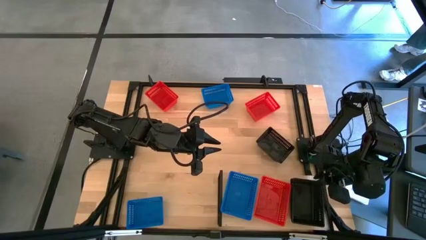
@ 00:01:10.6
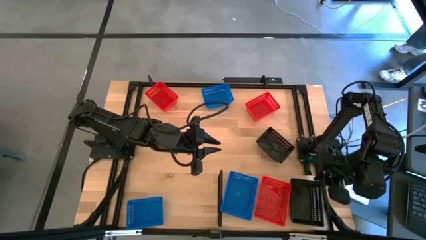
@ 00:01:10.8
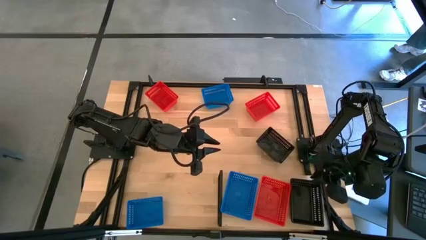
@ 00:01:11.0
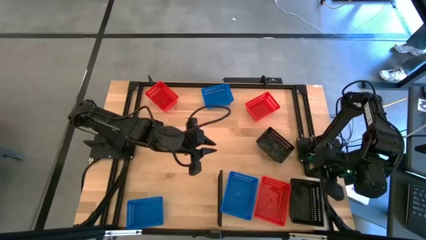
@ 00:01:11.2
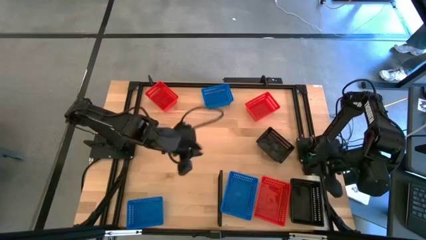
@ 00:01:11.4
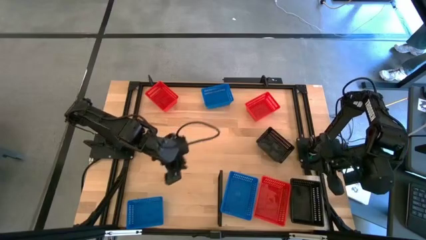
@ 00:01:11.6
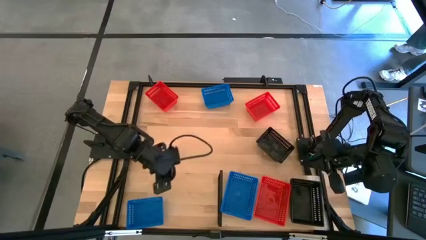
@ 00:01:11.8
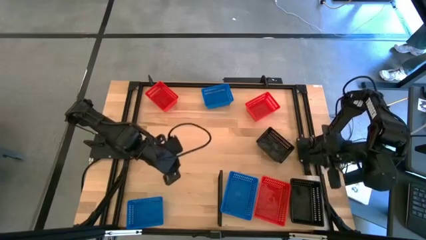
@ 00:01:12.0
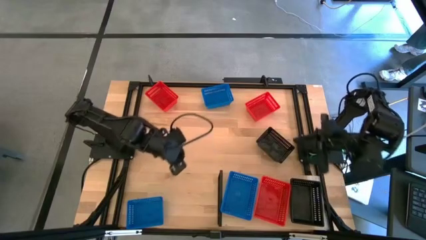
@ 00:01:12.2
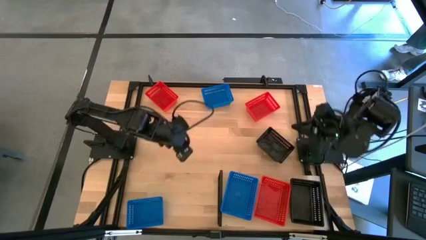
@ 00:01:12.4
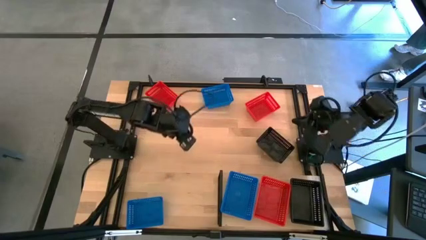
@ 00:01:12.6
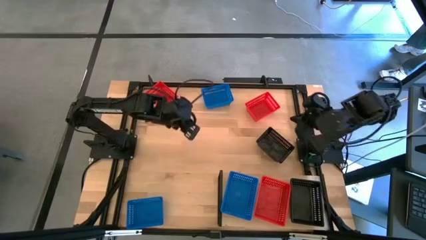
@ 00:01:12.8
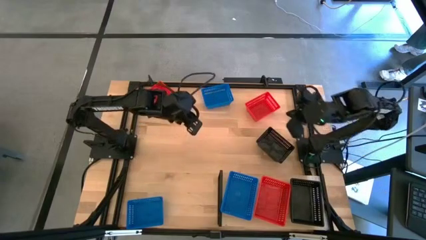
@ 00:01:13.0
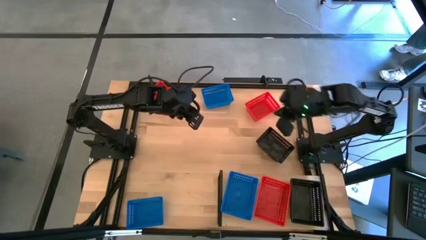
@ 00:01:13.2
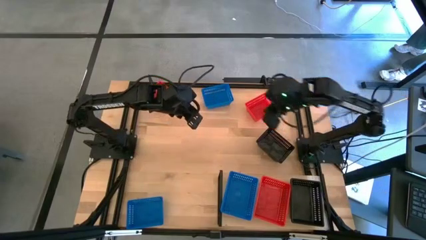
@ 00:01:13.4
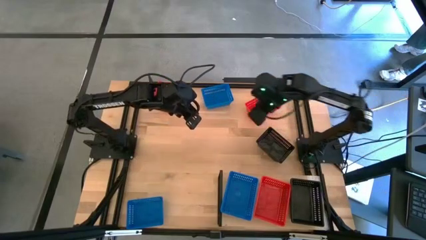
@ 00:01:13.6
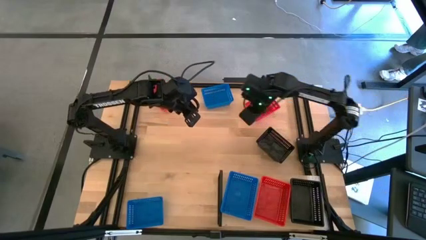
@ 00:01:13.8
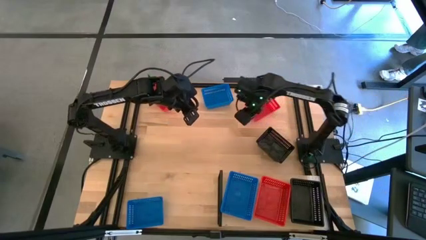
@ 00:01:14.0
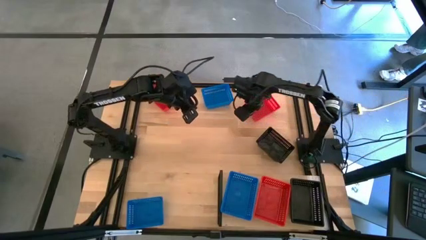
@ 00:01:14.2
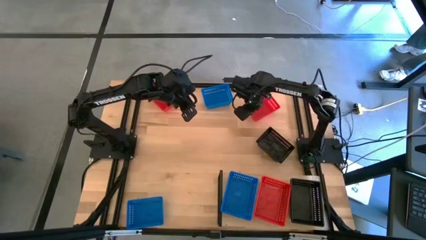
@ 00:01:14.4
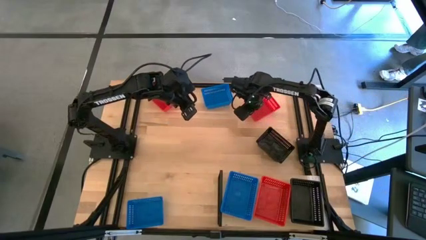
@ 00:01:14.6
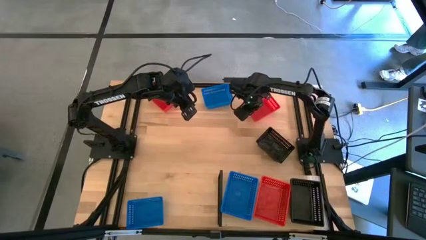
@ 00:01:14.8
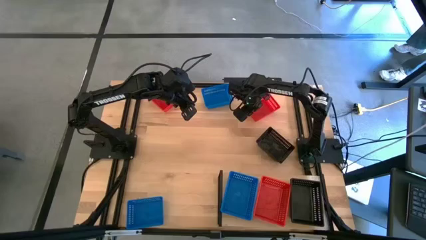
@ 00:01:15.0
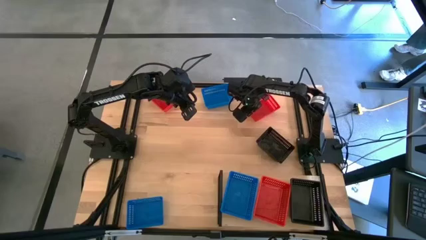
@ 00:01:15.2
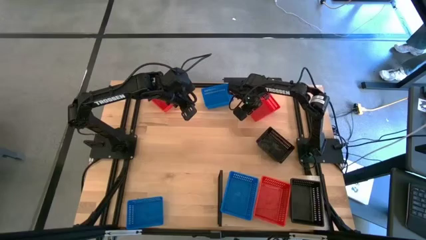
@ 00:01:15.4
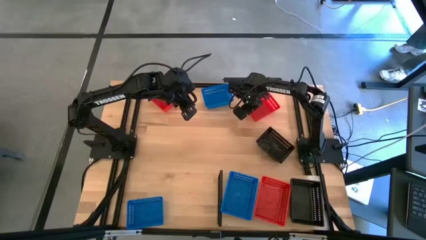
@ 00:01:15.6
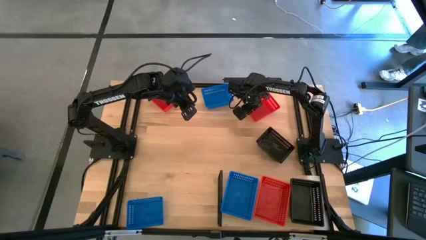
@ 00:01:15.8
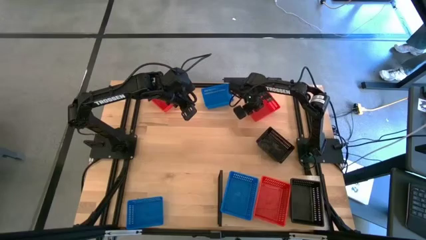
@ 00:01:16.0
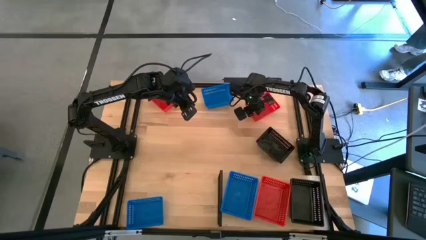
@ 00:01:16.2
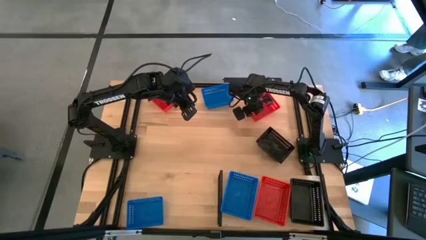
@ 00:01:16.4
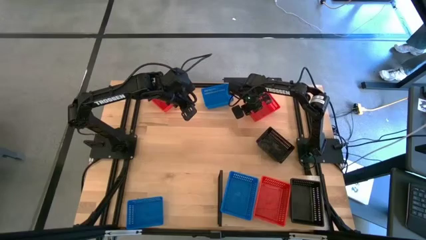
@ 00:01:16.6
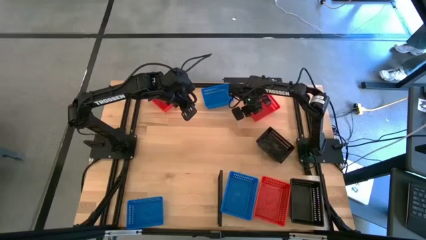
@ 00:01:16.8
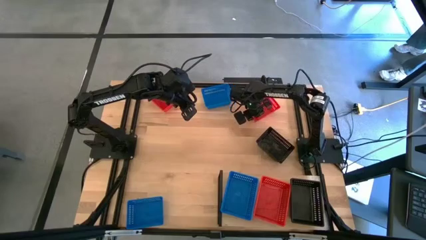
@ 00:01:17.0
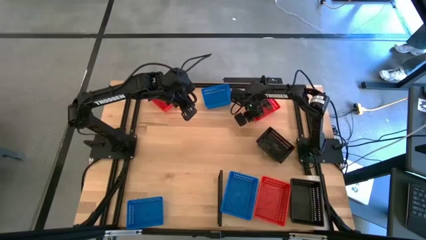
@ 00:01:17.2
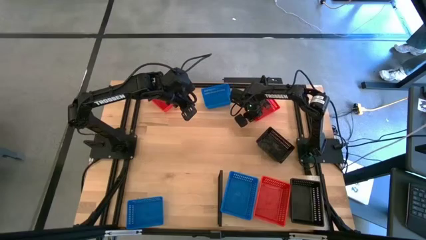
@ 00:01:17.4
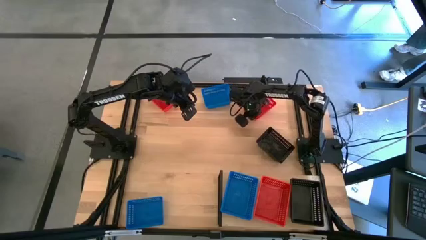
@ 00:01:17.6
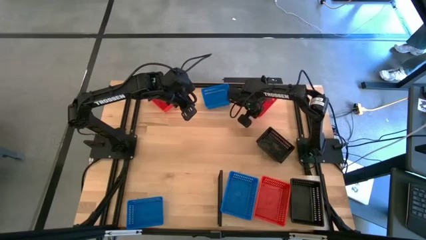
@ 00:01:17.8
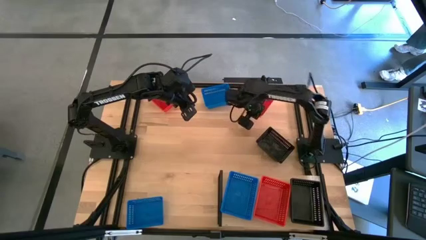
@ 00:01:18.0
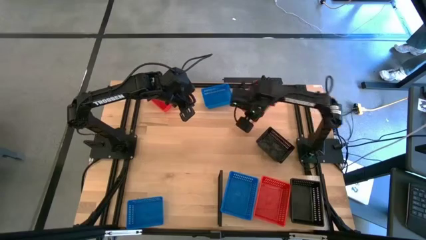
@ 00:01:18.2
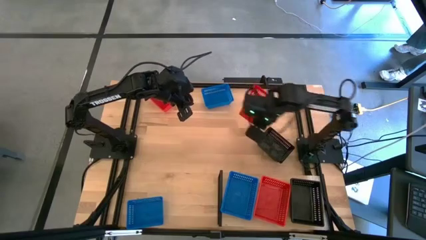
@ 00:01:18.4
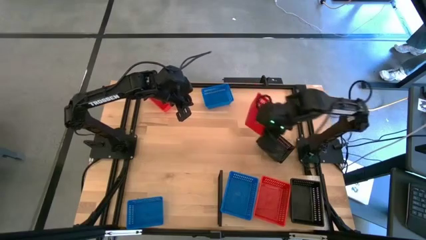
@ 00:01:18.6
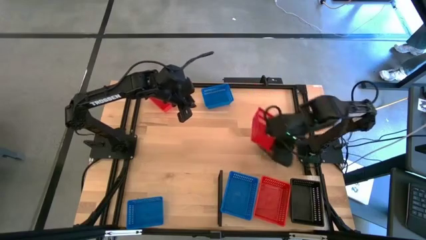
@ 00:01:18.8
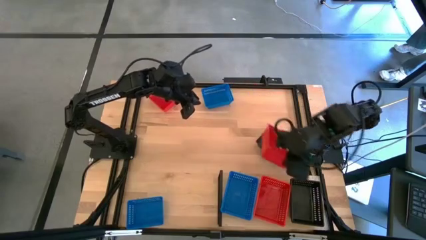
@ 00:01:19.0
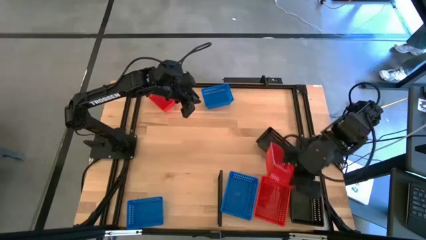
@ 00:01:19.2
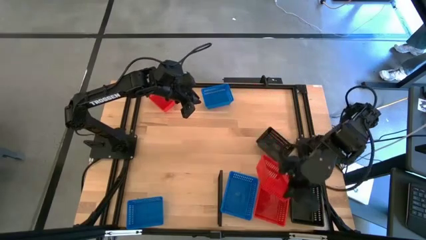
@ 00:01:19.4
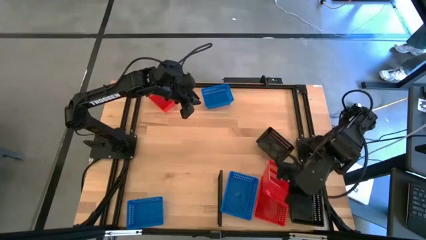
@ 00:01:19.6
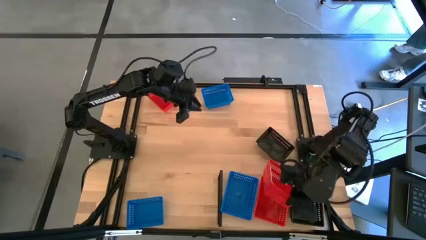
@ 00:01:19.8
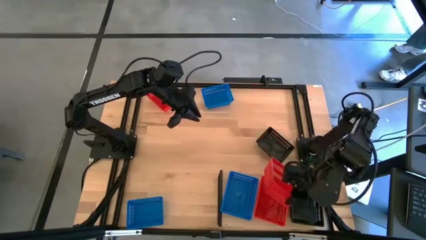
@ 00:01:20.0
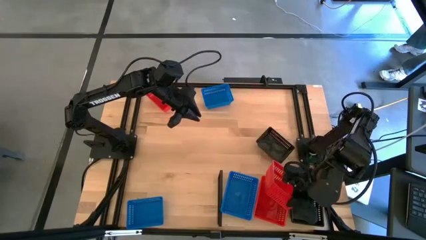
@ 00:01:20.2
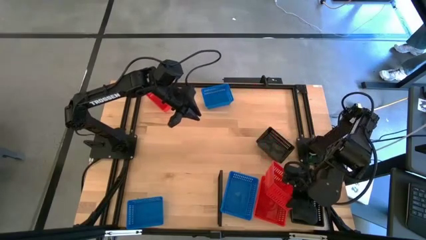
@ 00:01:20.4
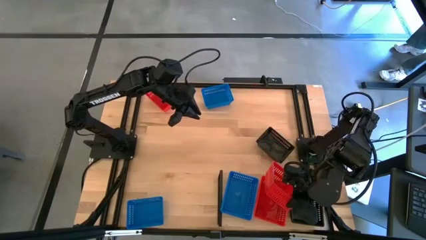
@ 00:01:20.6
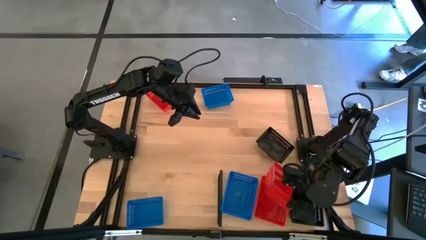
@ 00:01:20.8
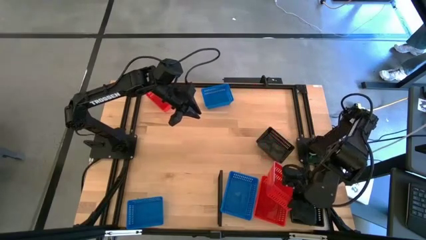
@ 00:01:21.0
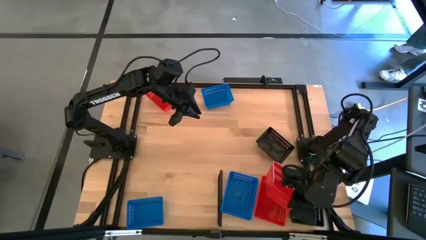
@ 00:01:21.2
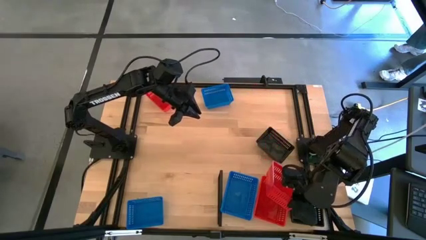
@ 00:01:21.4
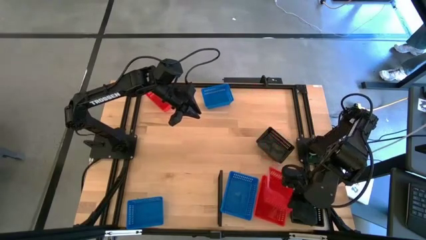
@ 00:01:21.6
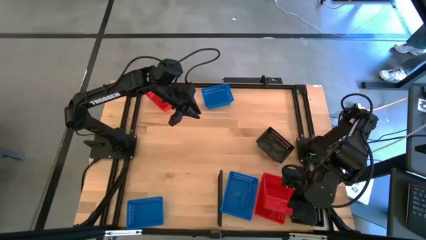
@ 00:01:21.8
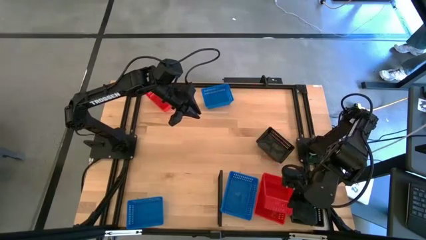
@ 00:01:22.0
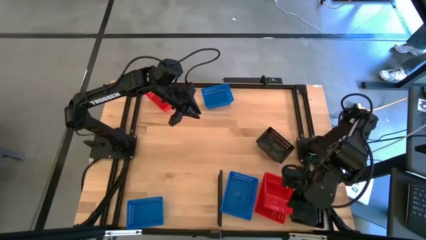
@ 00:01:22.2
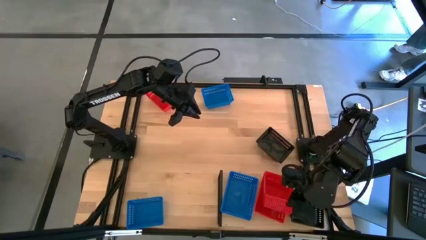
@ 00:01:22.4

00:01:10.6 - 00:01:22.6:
Task: Stack baskets on shelf by color
Stack the right red bin on top of the red bin on the shelf

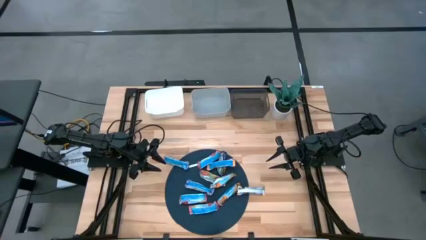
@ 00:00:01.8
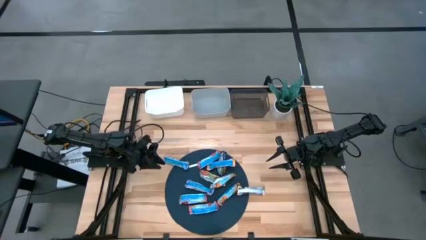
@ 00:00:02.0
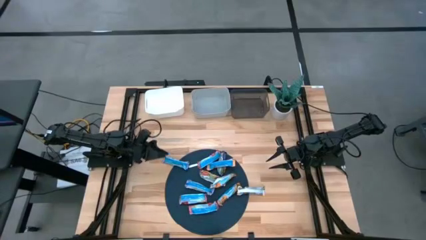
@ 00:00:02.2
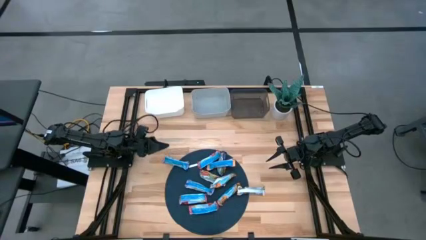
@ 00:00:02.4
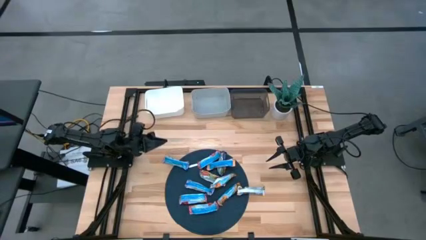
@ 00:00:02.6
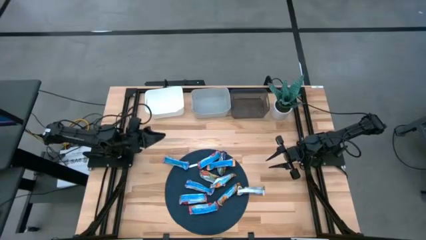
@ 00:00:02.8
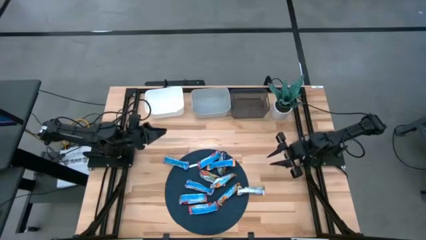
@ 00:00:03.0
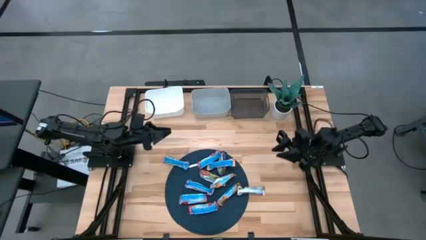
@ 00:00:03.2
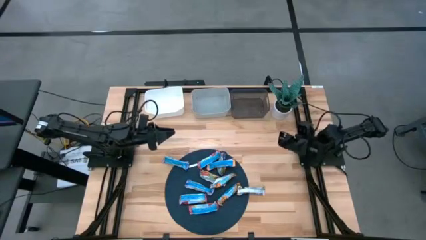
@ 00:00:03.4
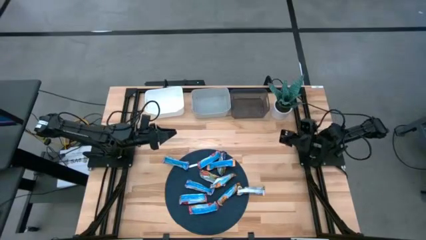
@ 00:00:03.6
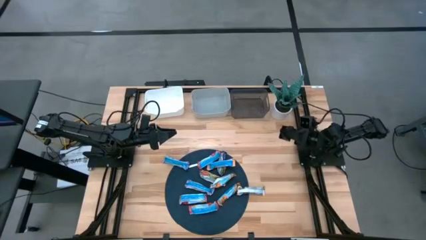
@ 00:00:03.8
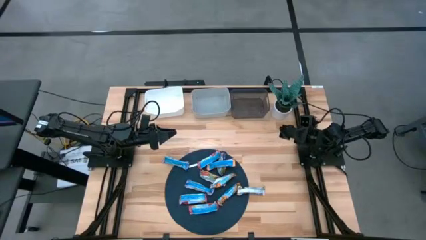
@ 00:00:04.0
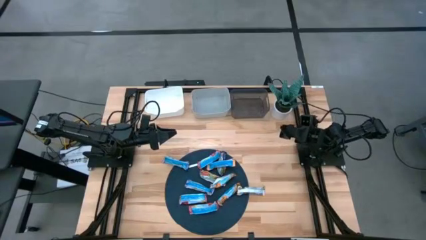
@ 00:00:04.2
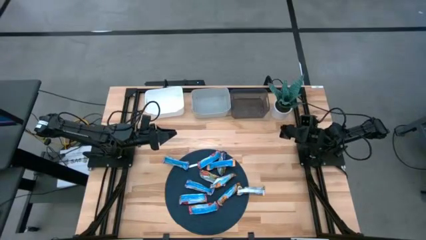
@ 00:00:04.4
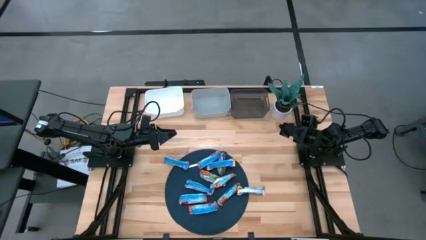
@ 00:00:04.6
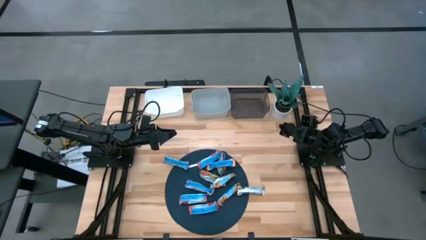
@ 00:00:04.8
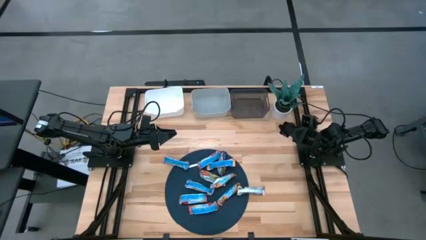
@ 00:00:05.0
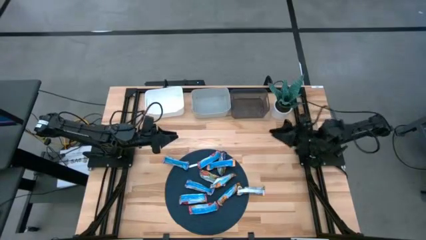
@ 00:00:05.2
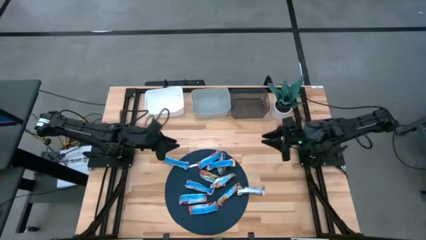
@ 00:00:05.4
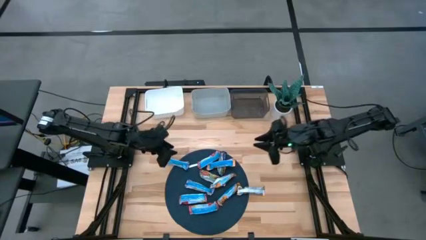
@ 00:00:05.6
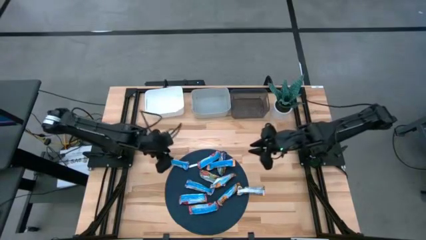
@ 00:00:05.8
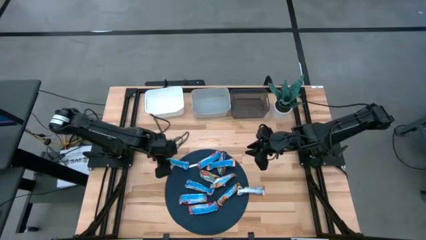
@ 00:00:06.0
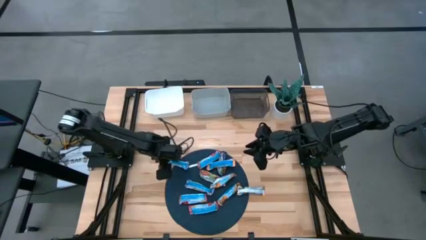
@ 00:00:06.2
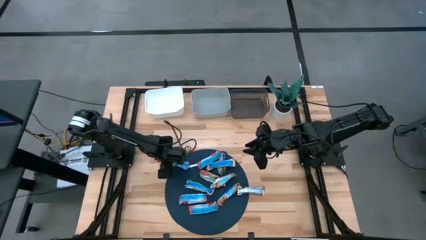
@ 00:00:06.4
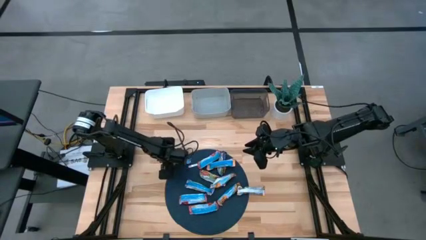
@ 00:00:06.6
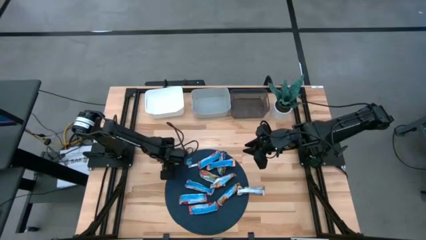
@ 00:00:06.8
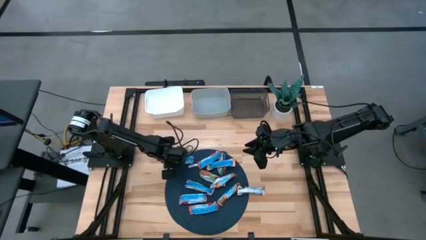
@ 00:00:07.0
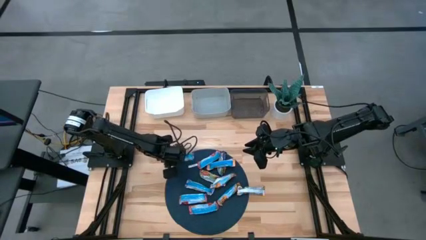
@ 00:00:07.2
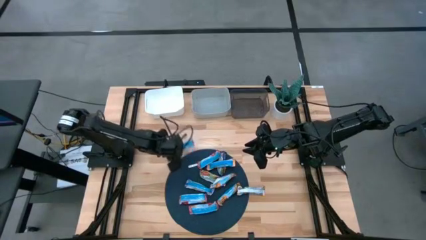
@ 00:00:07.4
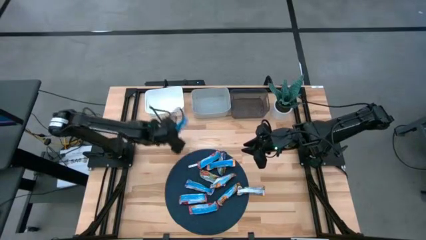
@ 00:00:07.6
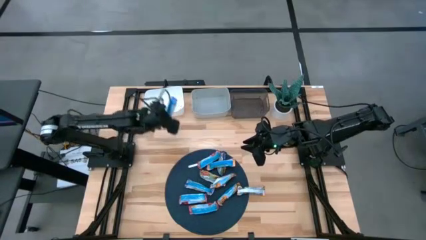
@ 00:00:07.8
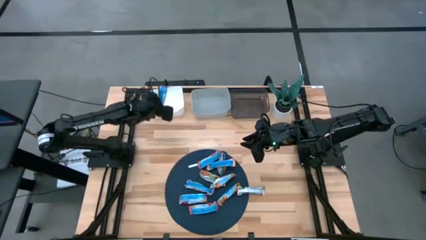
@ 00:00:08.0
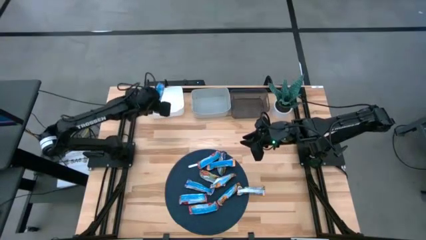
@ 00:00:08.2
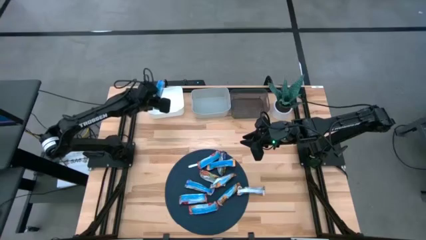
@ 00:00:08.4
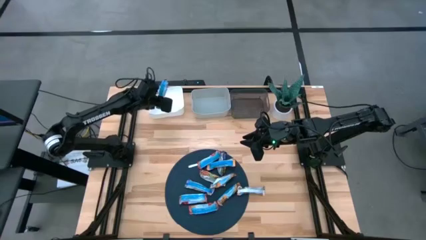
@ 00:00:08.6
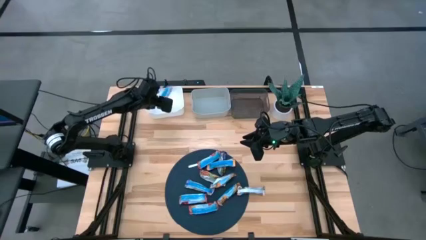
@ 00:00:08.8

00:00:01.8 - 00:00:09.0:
Task: Pick and place Granola Bars by type
Put the blue granola bar into the white bin
